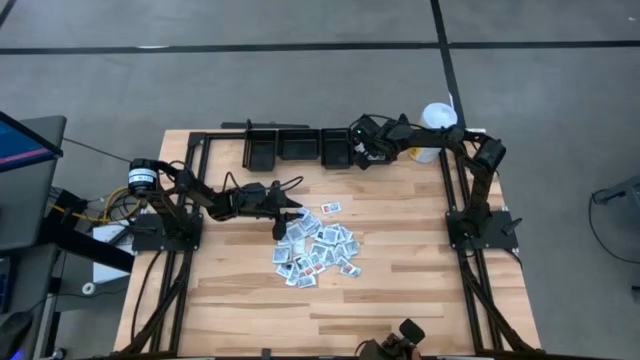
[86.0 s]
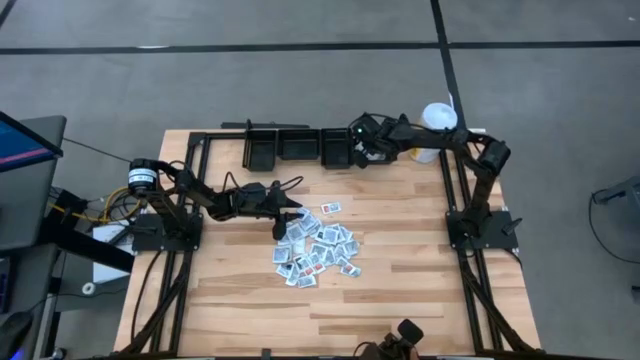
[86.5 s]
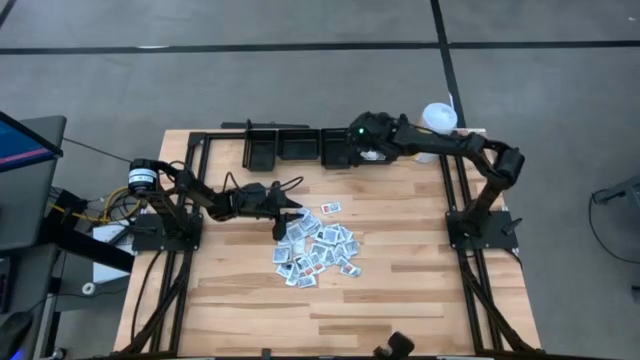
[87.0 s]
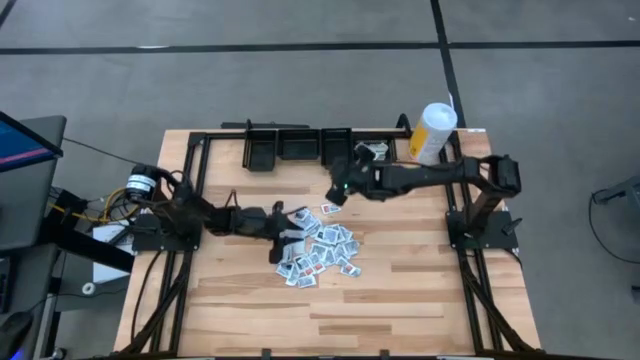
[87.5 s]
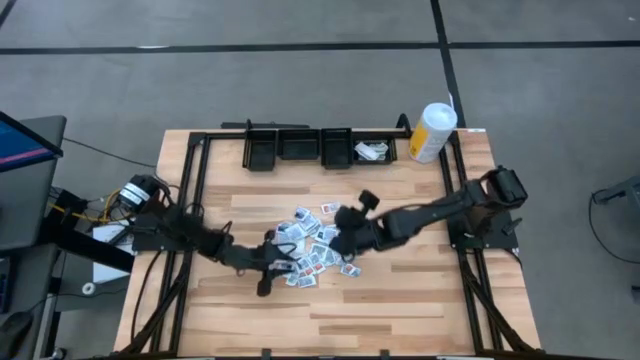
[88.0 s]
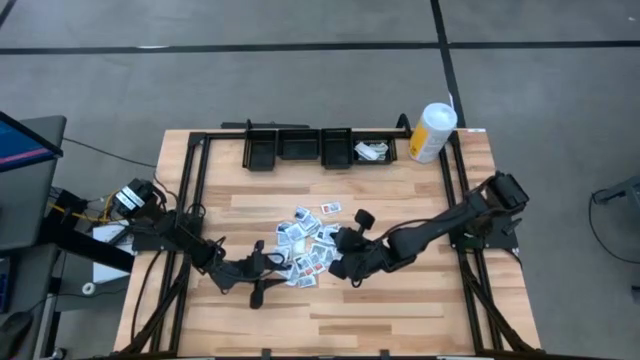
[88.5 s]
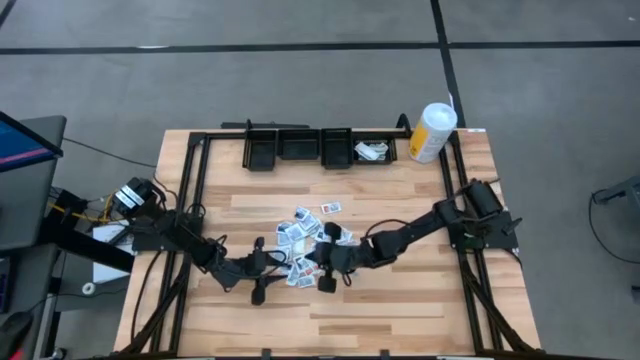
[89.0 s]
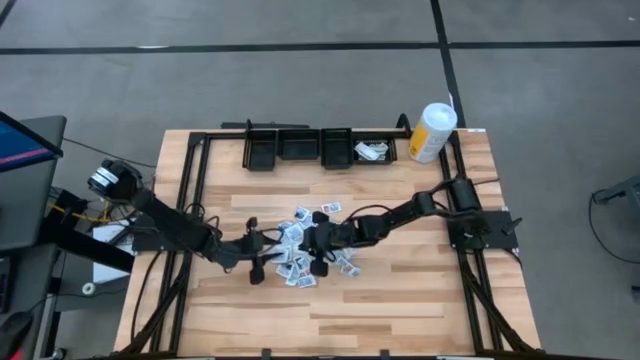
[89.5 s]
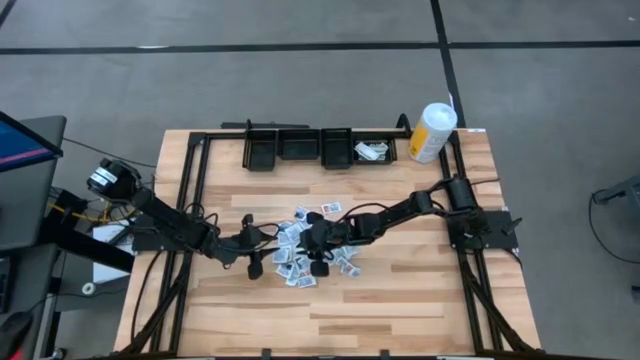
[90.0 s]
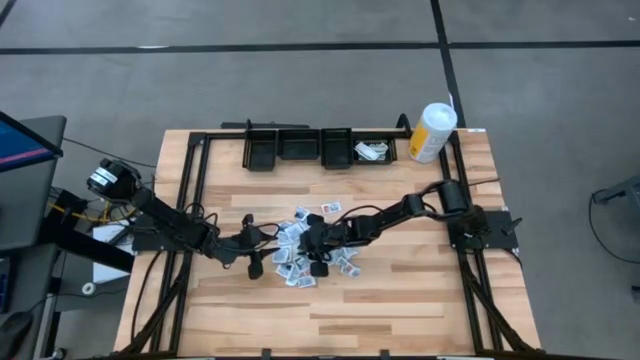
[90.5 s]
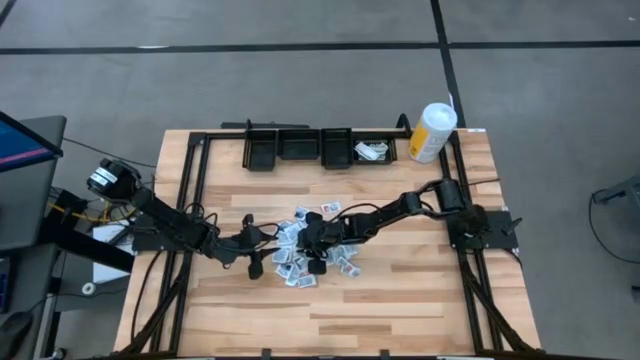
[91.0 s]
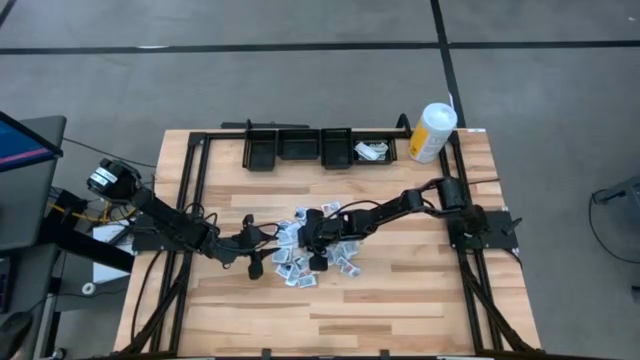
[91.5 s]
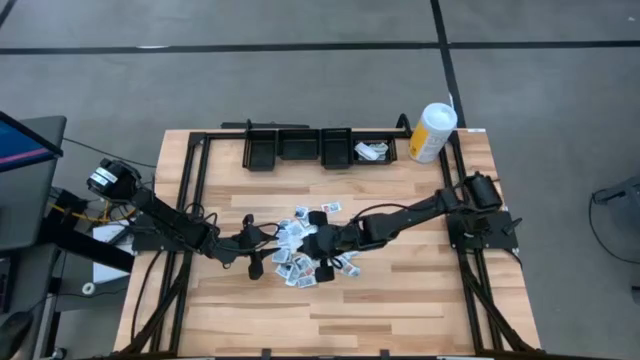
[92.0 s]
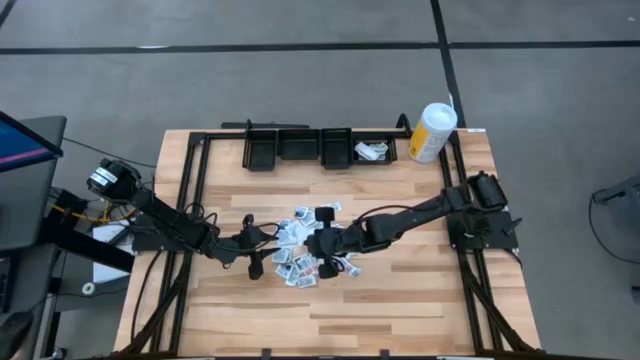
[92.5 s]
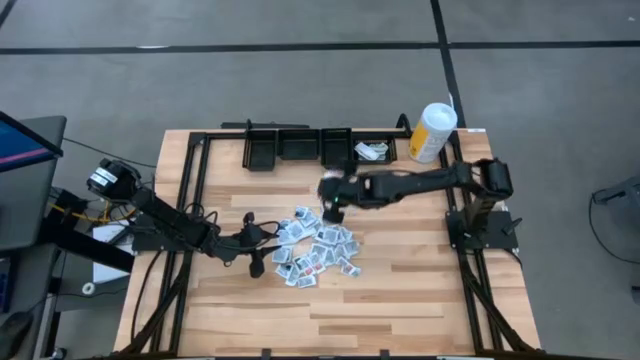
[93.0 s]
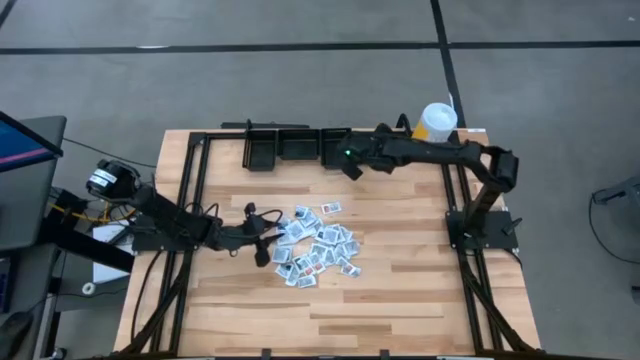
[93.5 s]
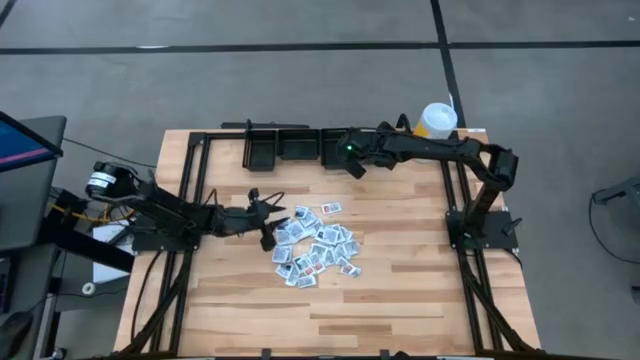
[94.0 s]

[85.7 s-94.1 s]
Task: Pick & Place First Aid Supplies
Put the green bandage pack into the right black bin

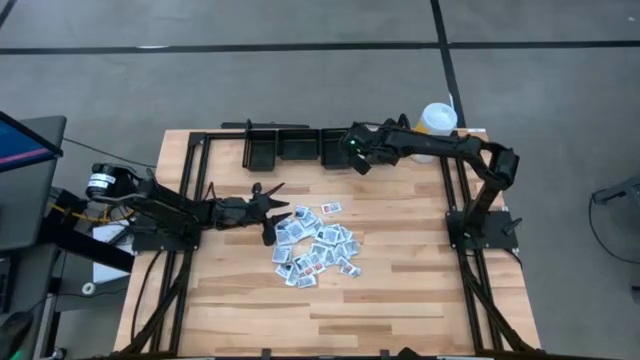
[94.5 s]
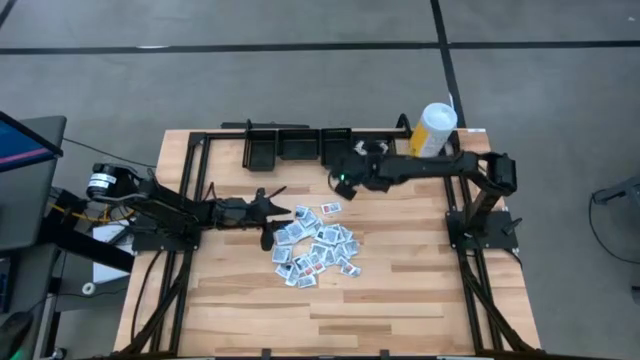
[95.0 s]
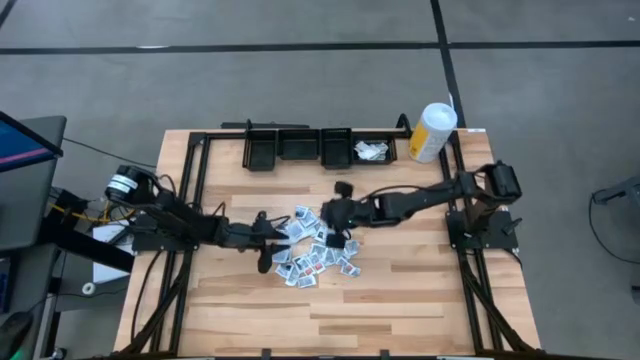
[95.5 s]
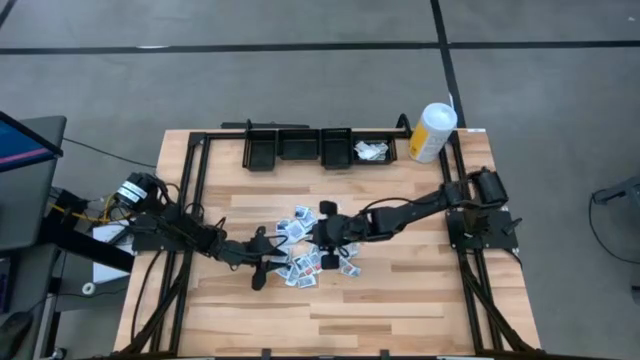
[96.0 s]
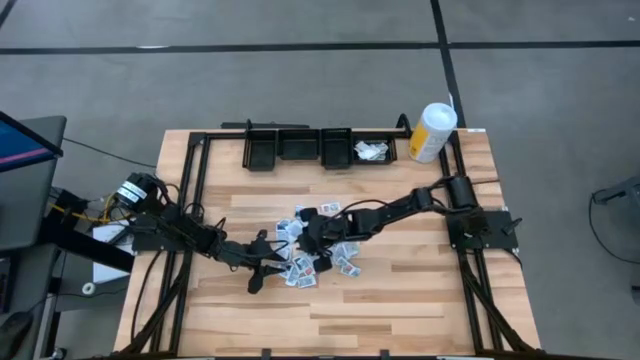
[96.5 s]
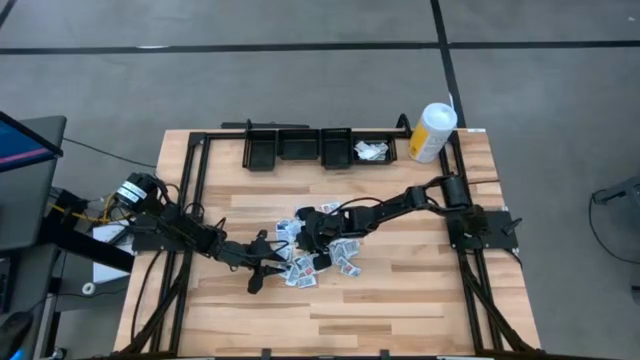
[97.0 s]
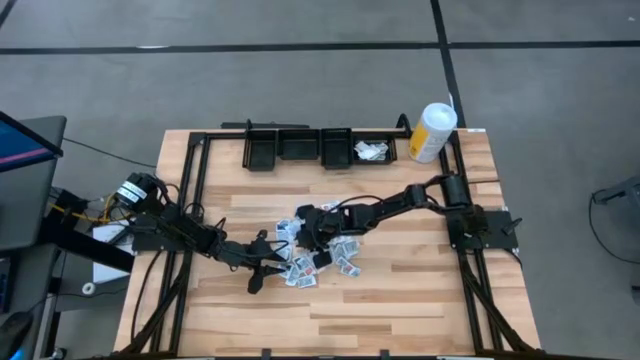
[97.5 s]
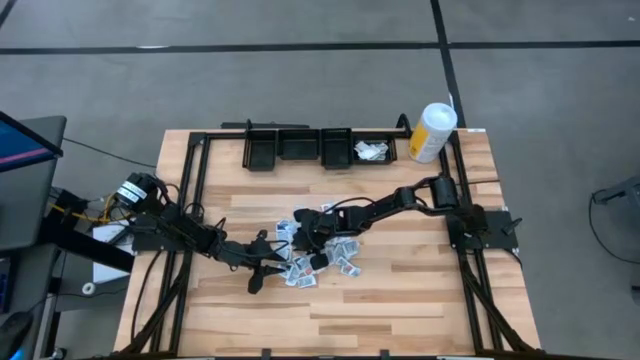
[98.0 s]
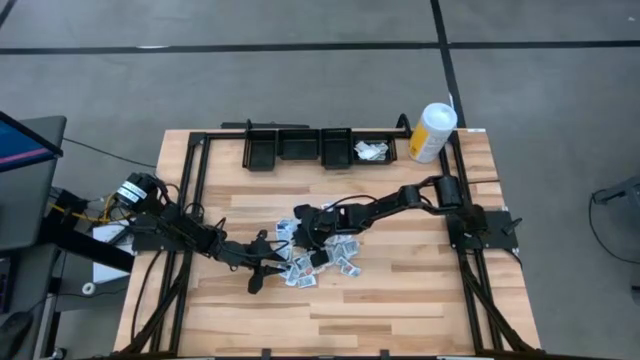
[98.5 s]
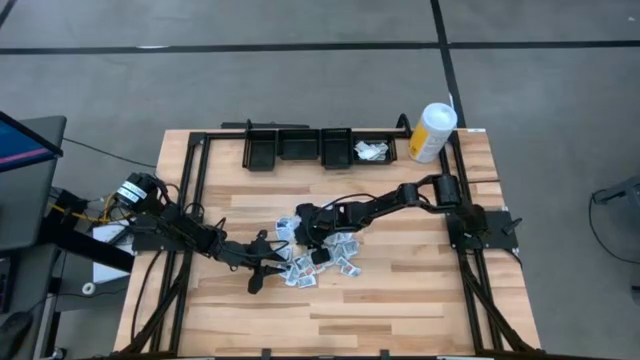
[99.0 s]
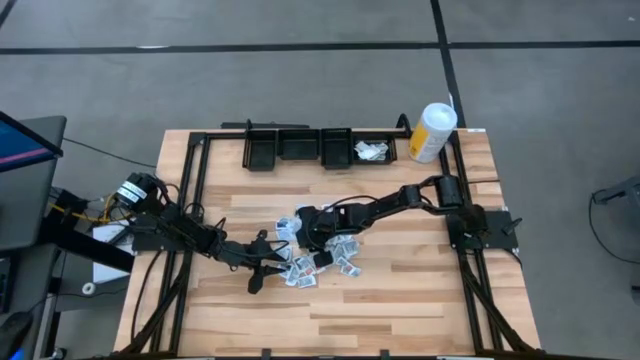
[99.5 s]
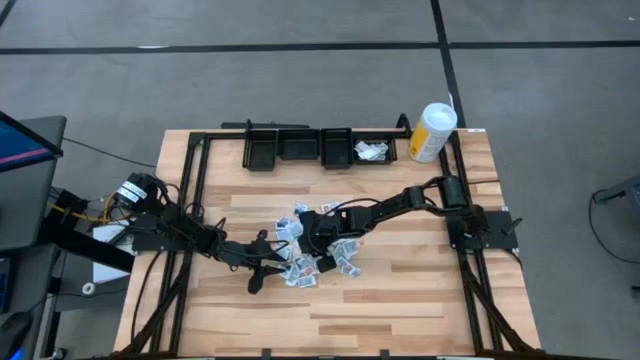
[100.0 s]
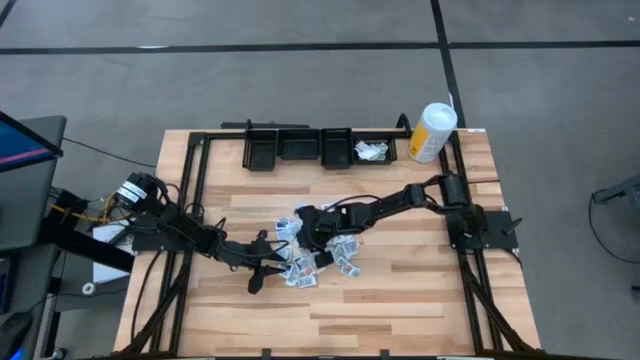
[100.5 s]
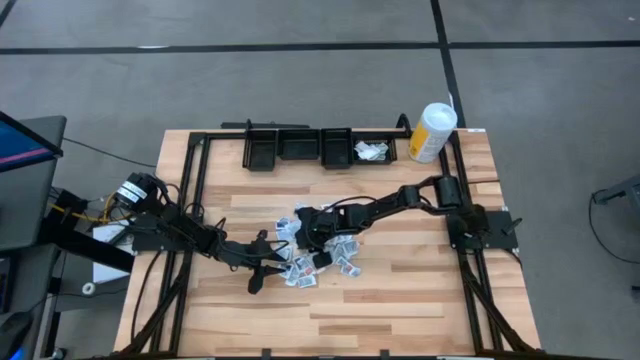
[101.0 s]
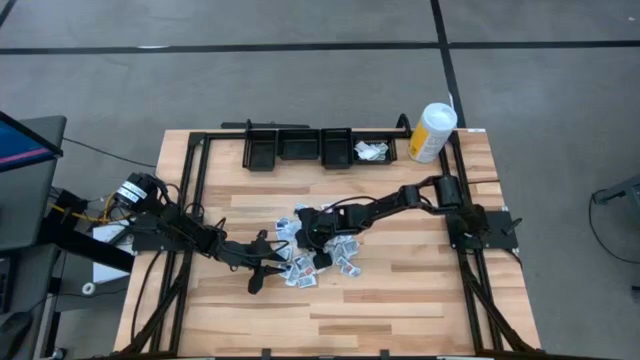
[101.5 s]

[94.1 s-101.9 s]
Put the green bandage pack into the right black bin

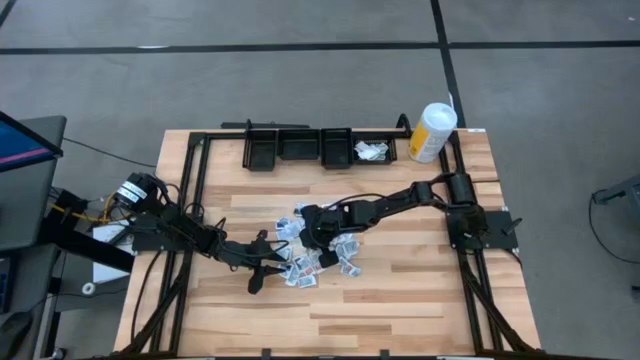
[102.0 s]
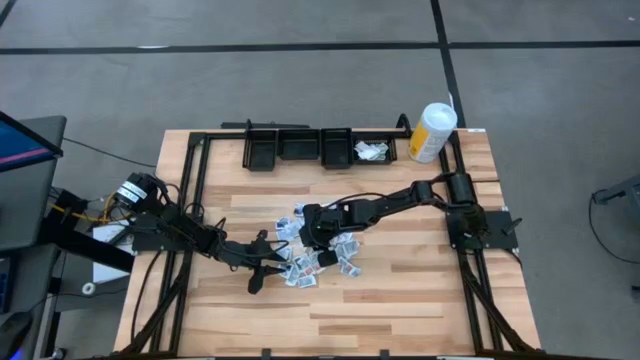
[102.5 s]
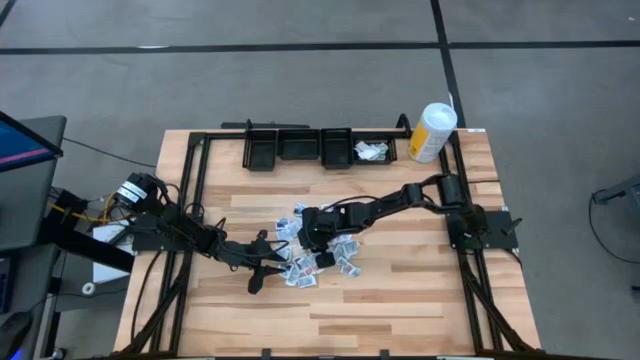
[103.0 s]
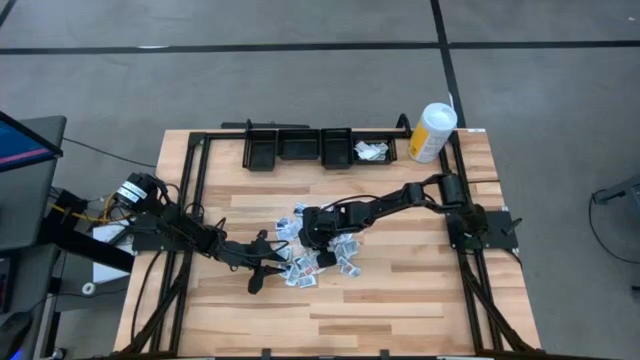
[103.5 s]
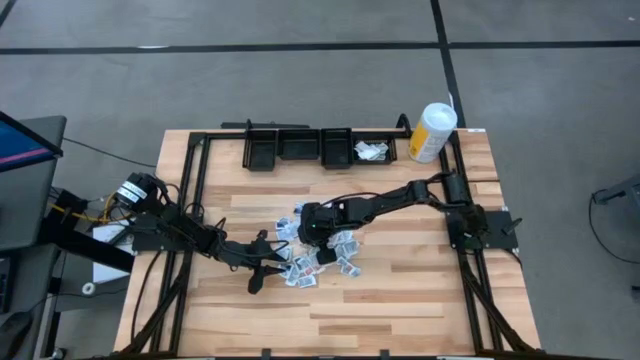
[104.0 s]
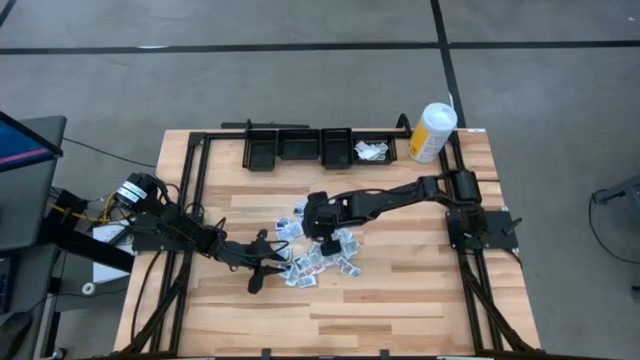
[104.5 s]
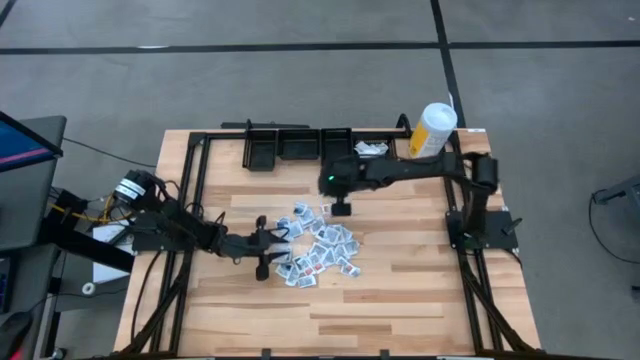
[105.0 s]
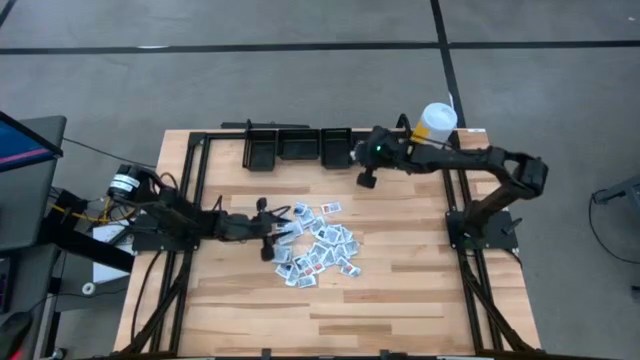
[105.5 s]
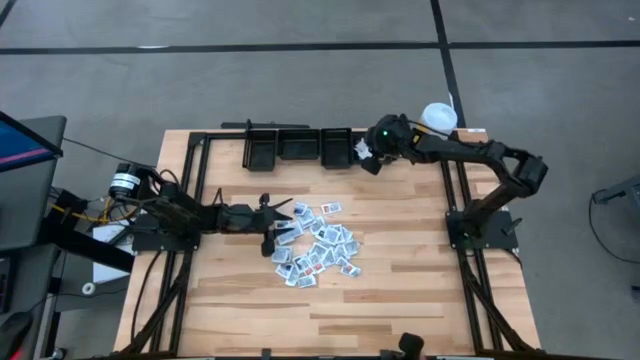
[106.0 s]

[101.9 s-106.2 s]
Put the green bandage pack into the right black bin
